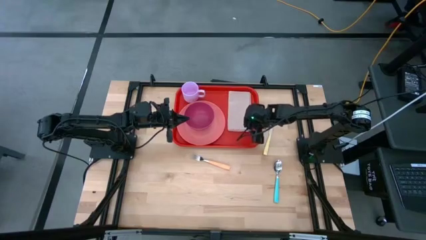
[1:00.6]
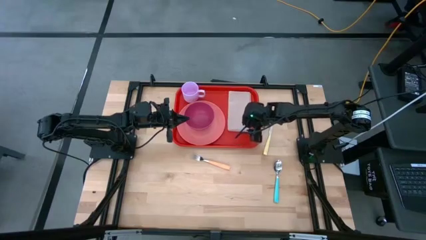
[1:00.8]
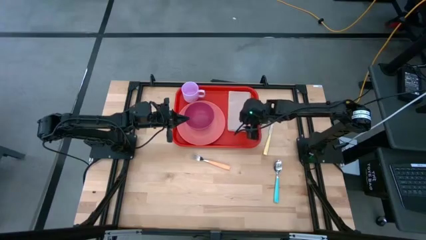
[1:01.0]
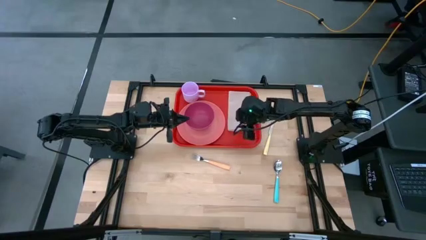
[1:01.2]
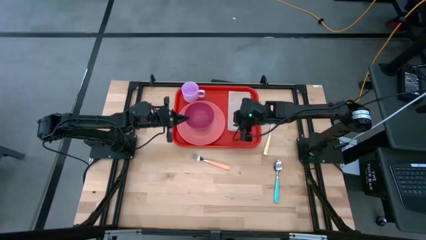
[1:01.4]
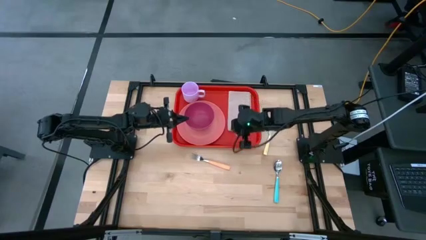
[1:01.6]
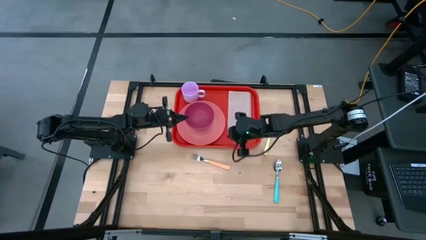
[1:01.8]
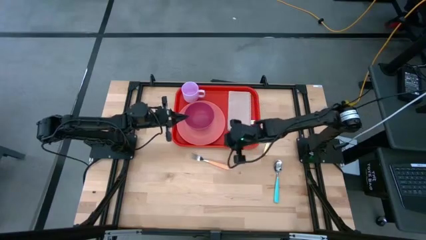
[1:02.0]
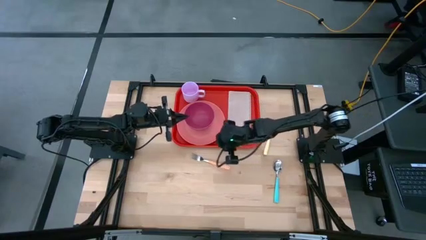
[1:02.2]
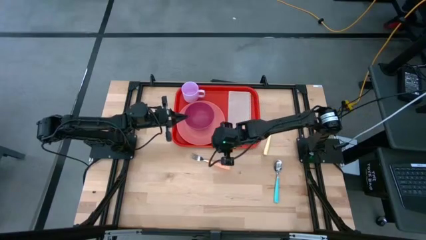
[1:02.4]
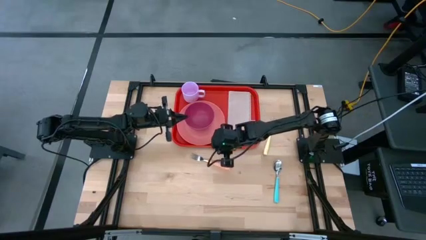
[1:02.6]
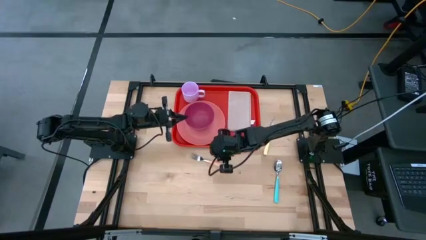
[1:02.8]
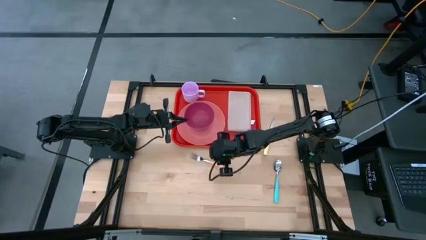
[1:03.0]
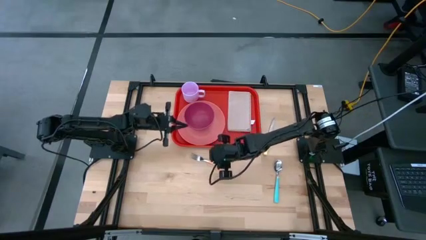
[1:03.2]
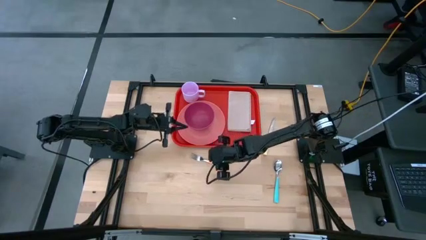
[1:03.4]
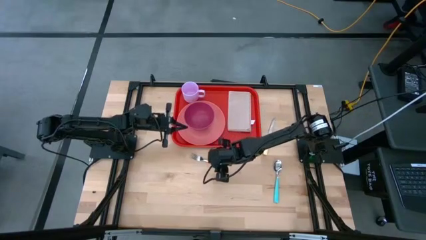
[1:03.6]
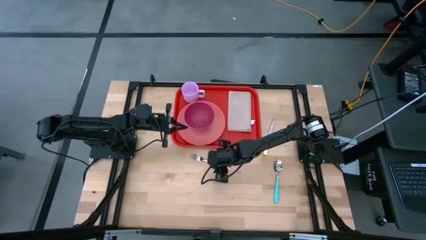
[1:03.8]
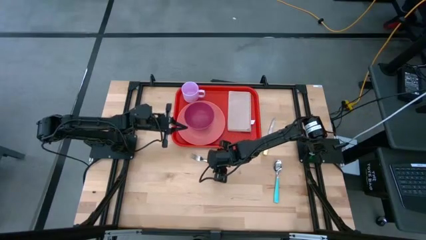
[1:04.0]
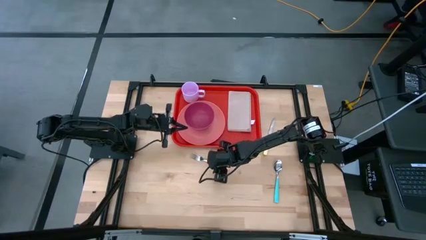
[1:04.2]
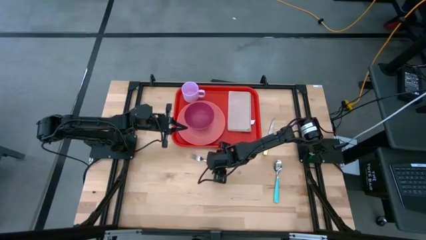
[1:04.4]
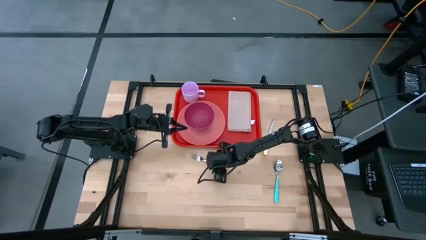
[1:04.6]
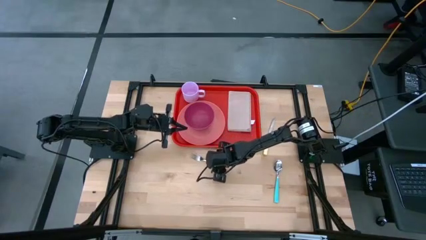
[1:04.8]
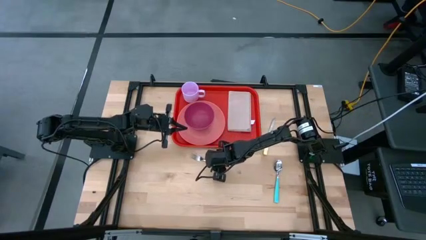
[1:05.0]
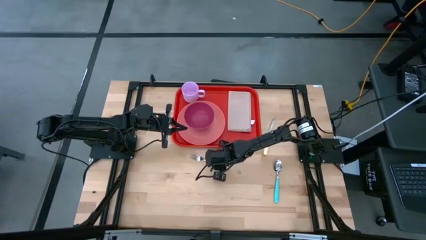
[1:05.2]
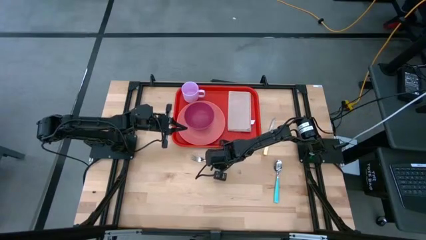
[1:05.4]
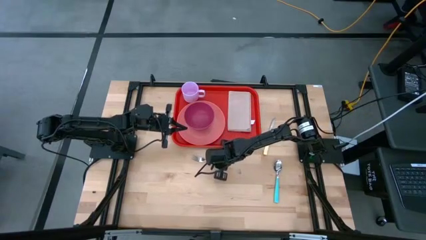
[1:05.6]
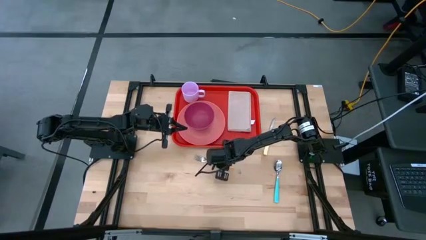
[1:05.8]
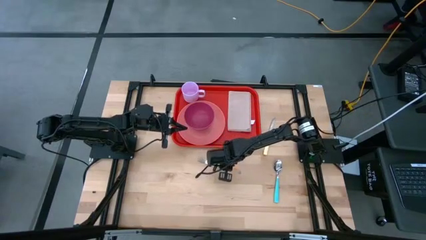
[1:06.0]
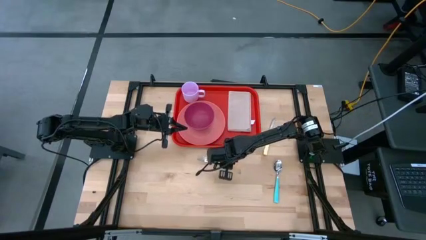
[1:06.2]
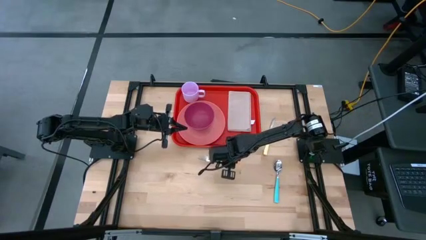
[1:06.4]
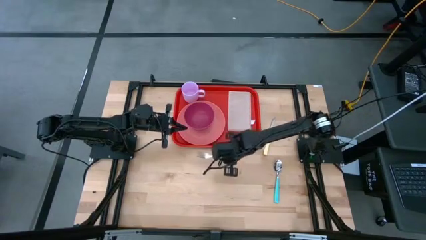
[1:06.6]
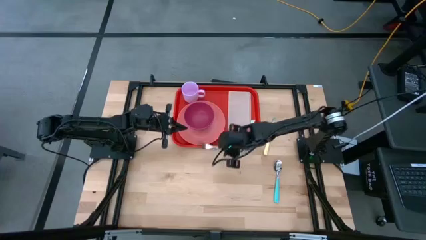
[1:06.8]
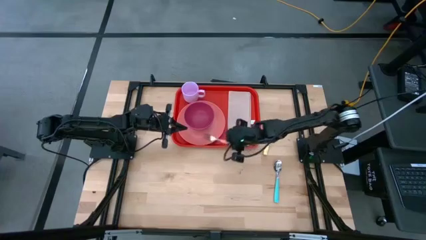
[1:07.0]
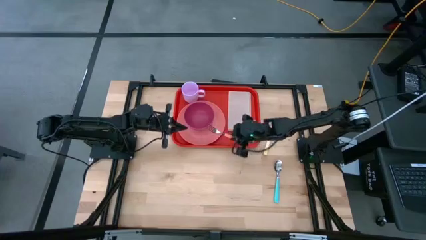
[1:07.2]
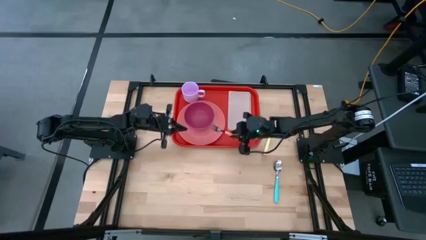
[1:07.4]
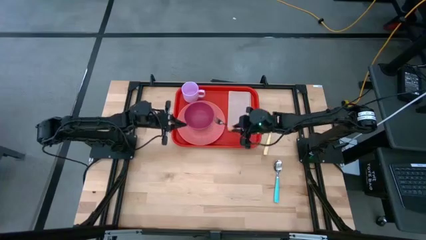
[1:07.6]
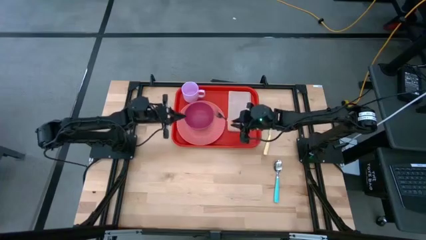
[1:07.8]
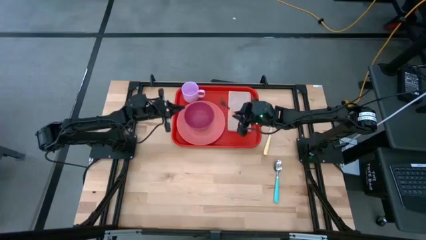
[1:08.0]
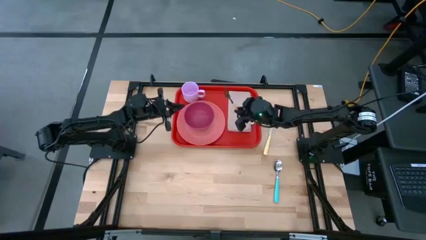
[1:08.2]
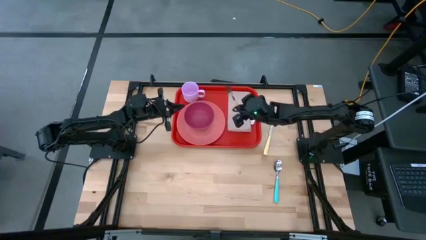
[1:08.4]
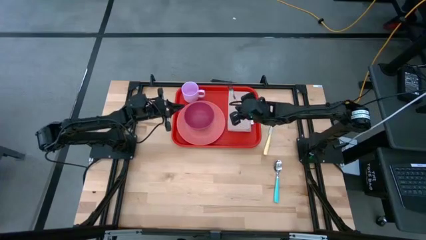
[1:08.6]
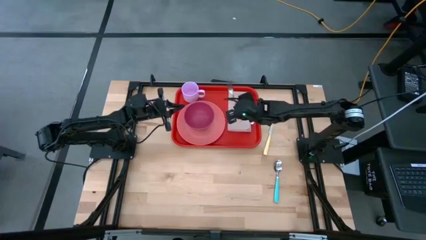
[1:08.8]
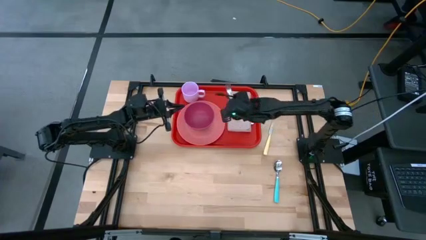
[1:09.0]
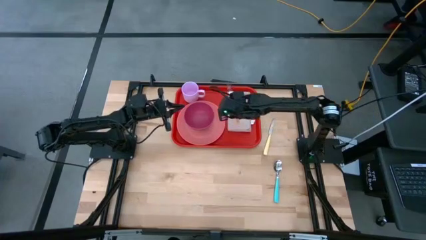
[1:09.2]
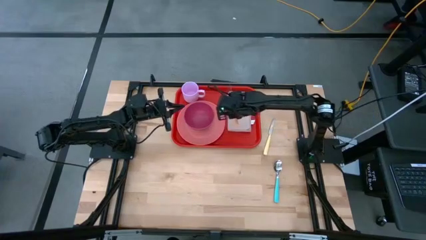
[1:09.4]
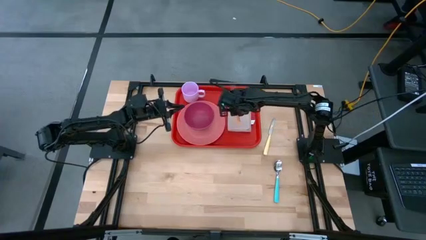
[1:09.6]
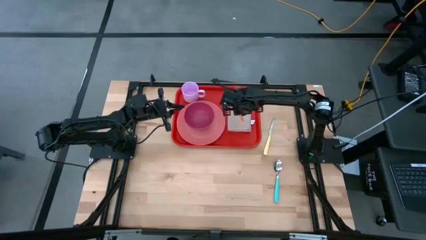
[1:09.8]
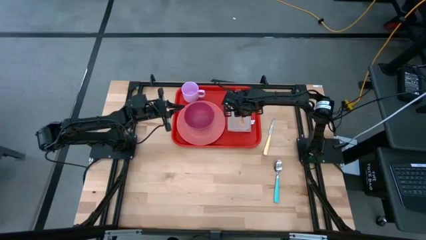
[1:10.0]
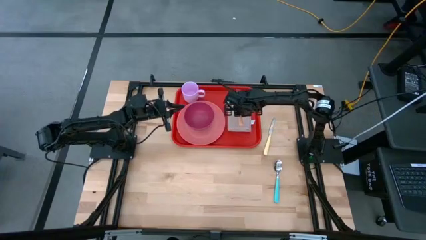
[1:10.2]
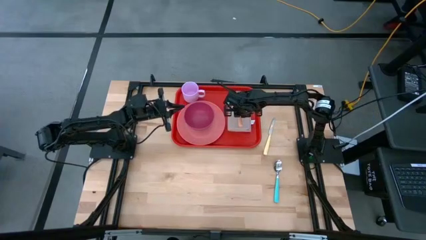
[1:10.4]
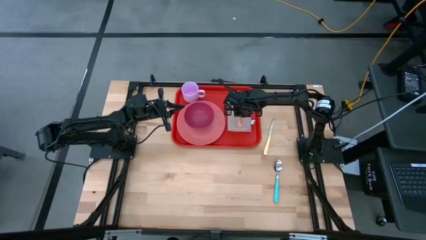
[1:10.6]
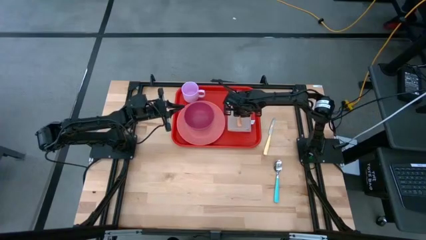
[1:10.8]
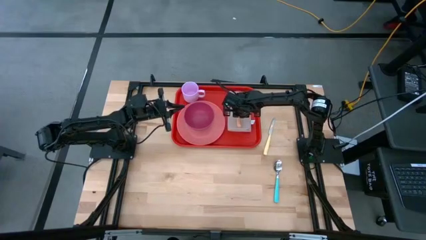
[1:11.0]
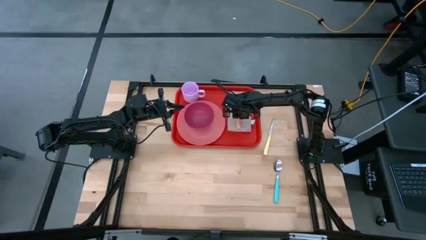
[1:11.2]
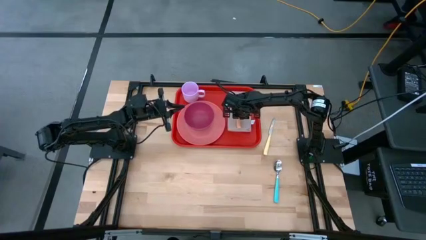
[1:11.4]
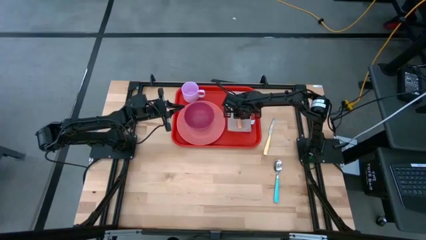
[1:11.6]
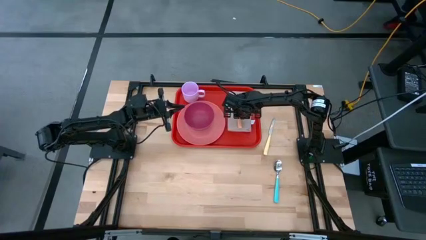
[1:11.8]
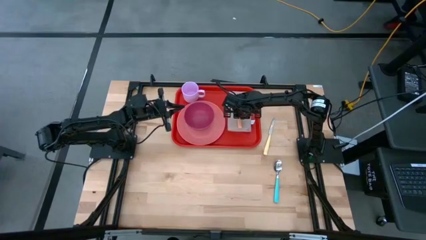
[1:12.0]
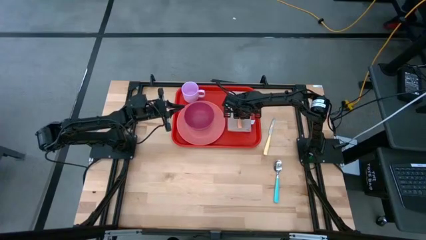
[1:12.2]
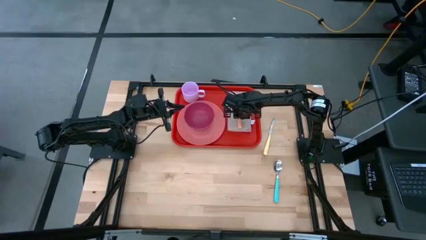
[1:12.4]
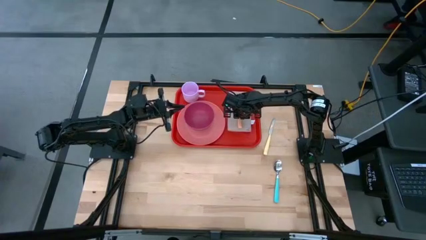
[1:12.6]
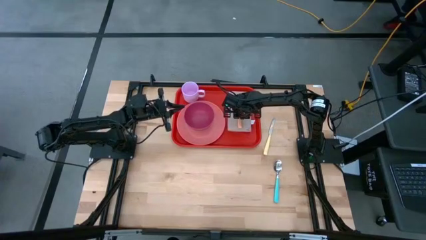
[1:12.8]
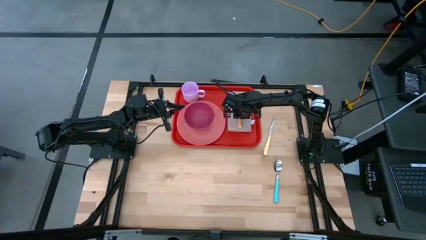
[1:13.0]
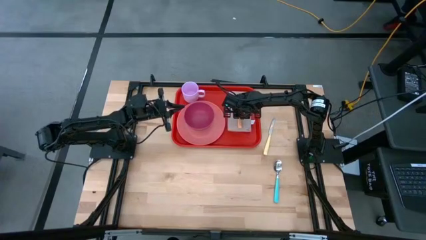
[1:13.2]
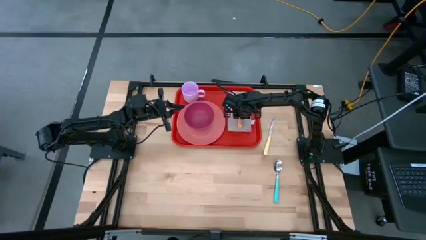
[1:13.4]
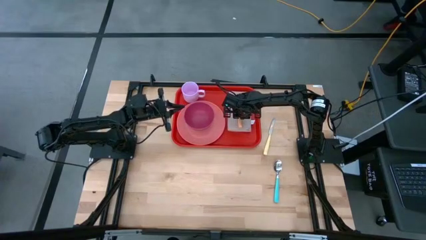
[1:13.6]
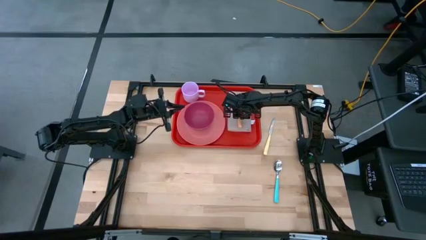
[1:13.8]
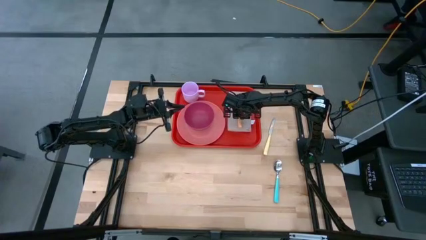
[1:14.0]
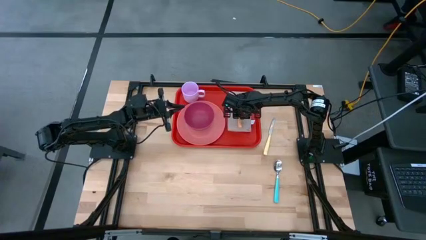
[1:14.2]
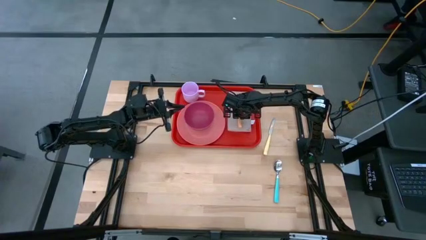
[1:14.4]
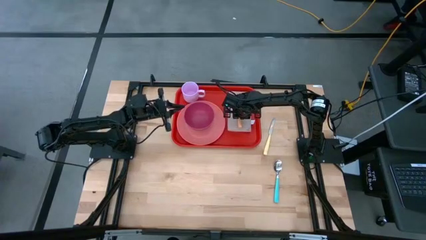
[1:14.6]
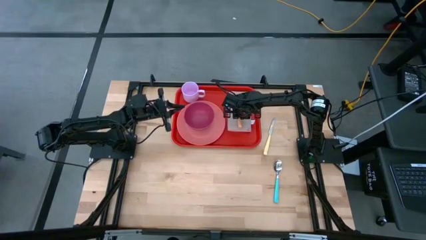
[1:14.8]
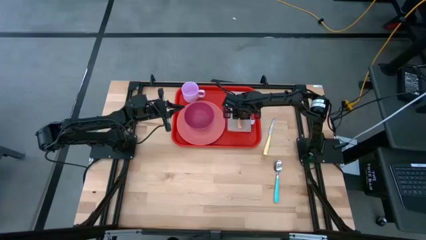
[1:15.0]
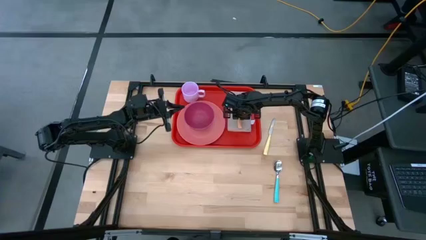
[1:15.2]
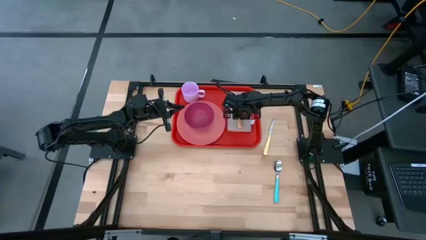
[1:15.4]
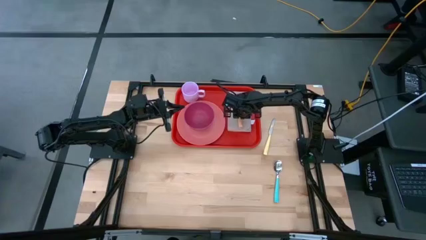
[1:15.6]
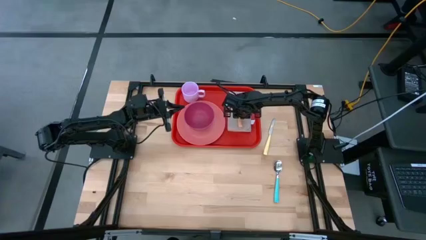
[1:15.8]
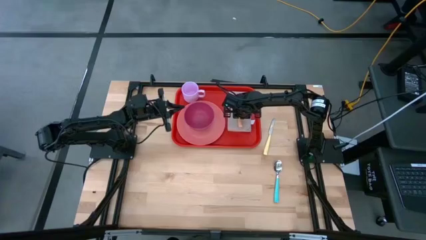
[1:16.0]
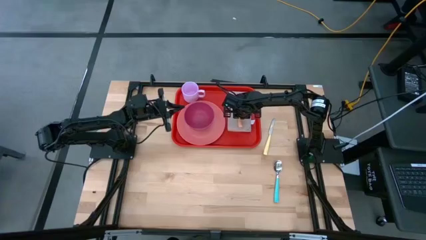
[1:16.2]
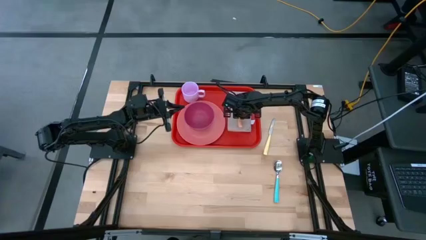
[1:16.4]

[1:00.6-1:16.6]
Task: Set up tray
Put the orange fork on top of the brown napkin on the red serving tray
